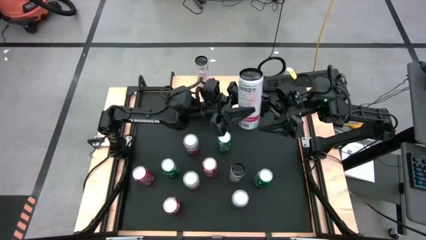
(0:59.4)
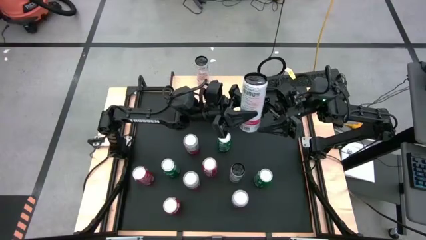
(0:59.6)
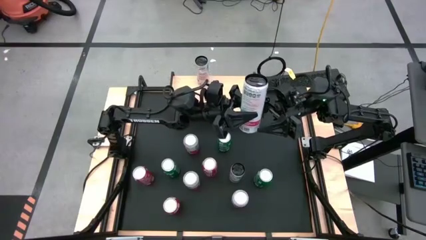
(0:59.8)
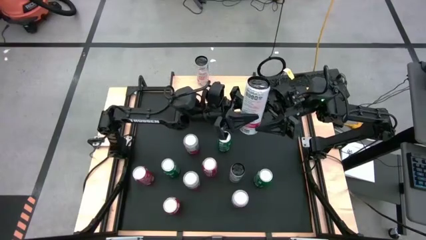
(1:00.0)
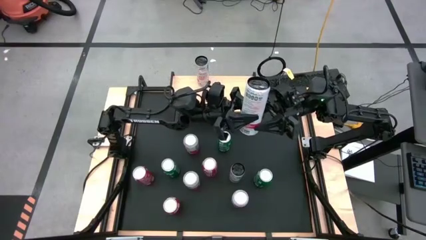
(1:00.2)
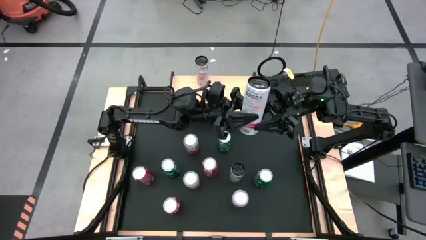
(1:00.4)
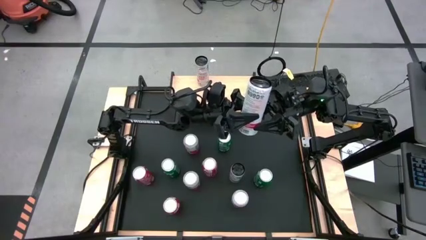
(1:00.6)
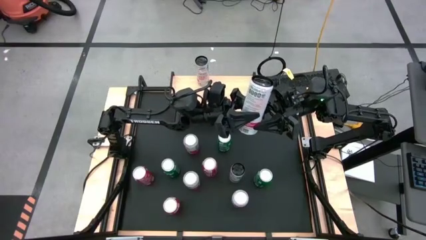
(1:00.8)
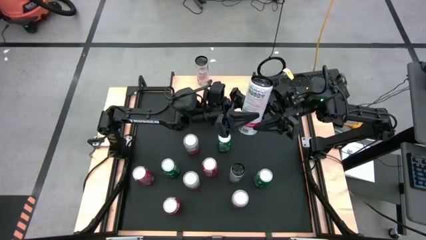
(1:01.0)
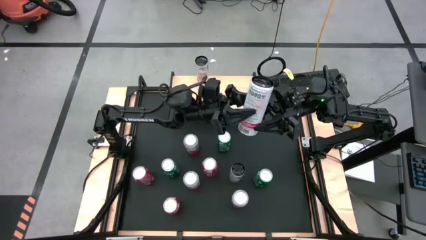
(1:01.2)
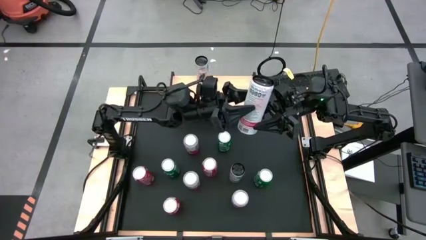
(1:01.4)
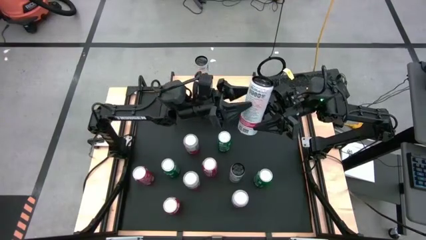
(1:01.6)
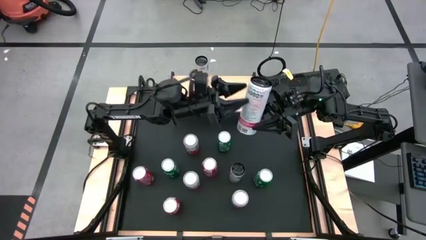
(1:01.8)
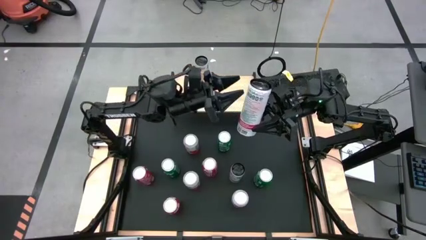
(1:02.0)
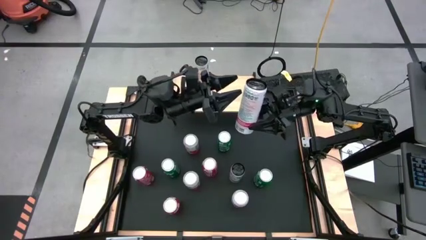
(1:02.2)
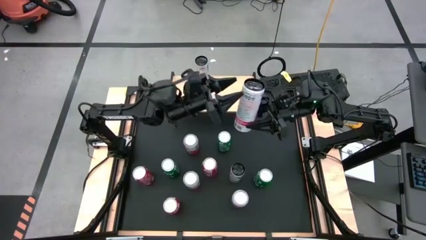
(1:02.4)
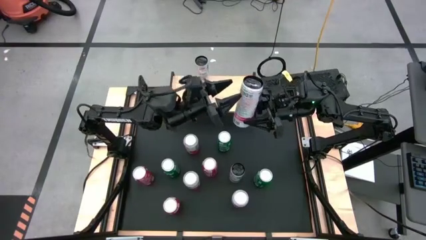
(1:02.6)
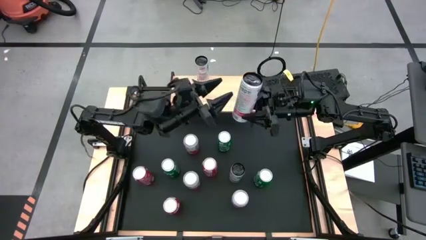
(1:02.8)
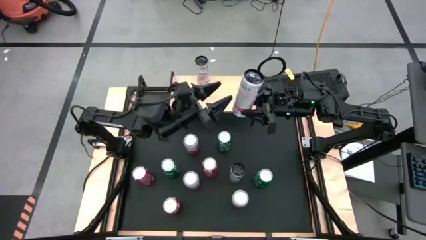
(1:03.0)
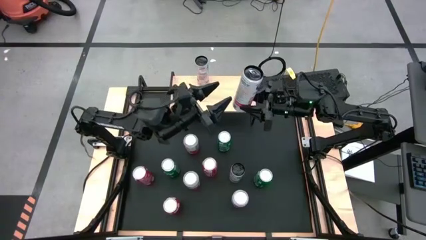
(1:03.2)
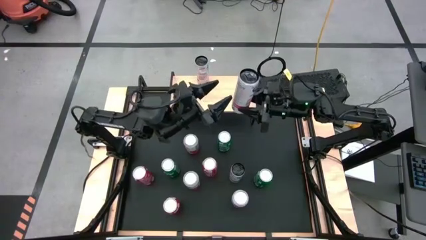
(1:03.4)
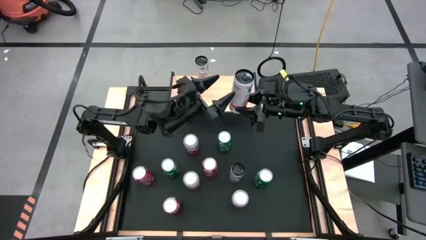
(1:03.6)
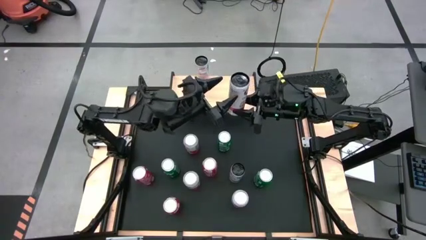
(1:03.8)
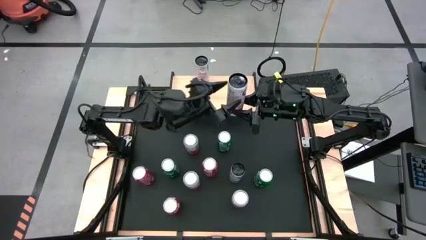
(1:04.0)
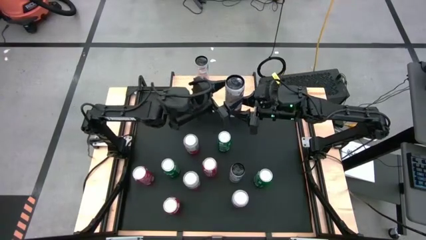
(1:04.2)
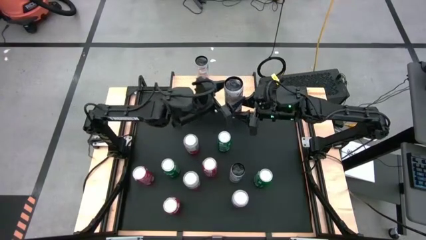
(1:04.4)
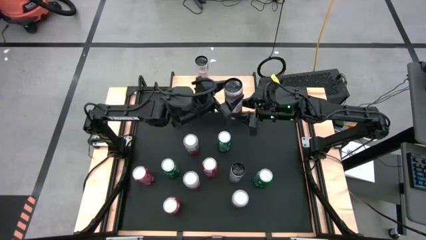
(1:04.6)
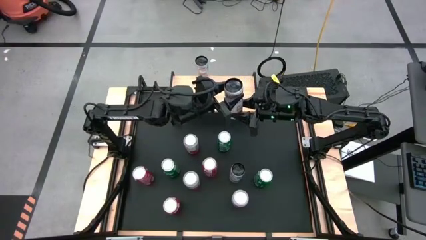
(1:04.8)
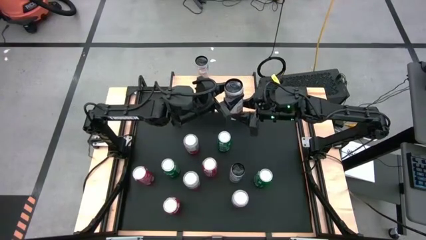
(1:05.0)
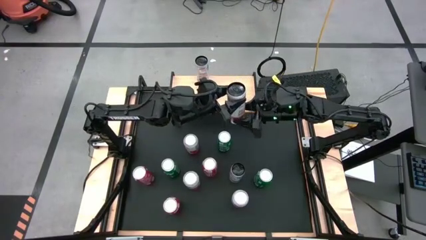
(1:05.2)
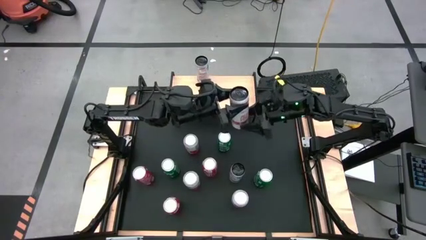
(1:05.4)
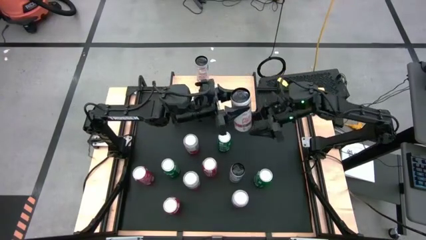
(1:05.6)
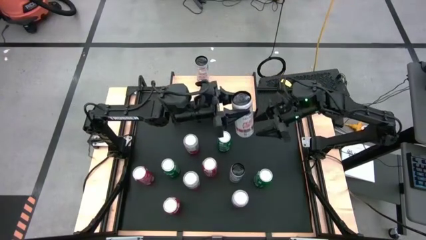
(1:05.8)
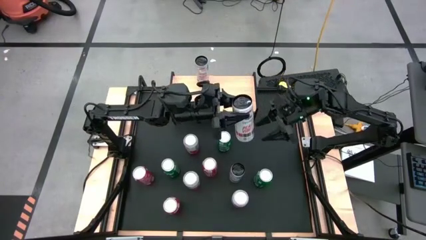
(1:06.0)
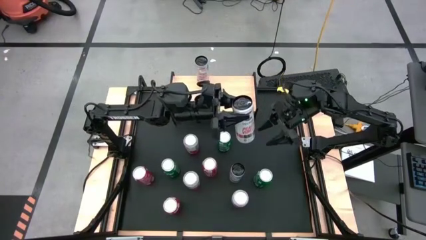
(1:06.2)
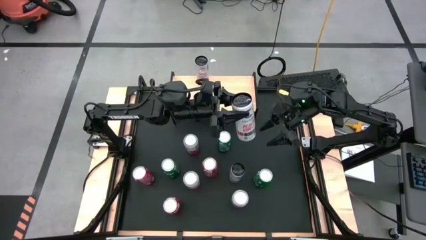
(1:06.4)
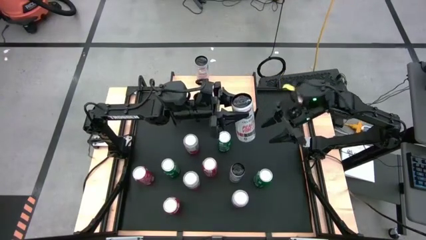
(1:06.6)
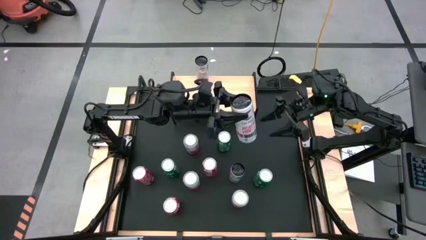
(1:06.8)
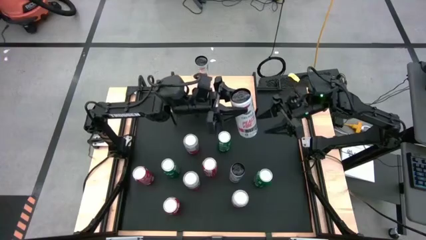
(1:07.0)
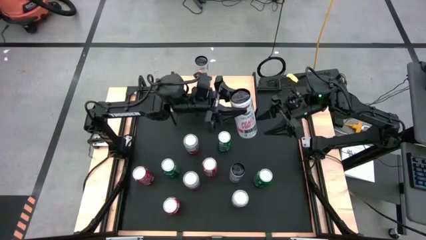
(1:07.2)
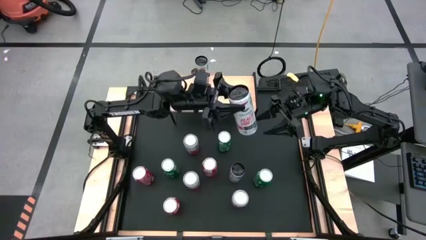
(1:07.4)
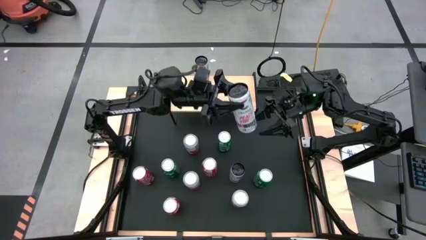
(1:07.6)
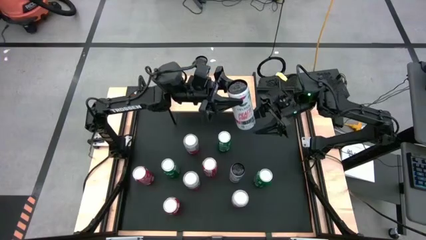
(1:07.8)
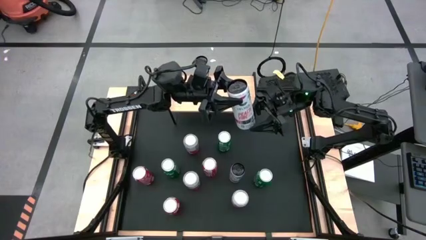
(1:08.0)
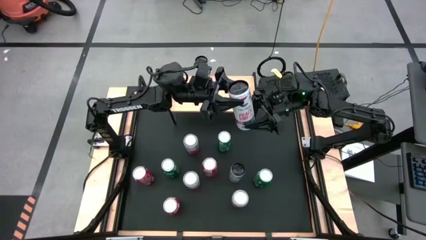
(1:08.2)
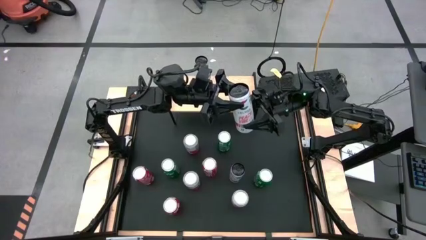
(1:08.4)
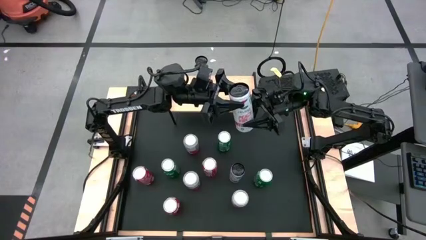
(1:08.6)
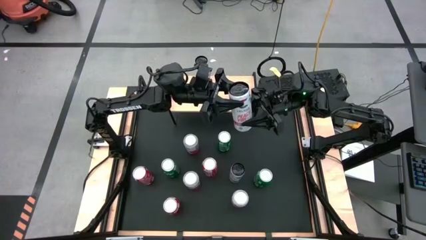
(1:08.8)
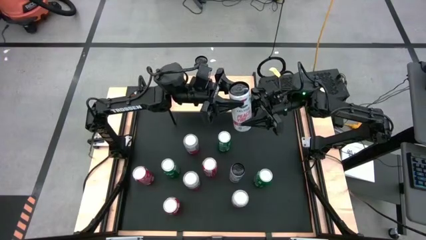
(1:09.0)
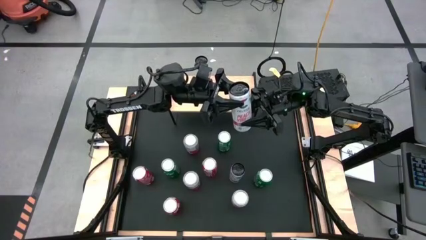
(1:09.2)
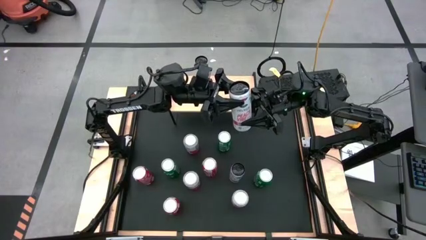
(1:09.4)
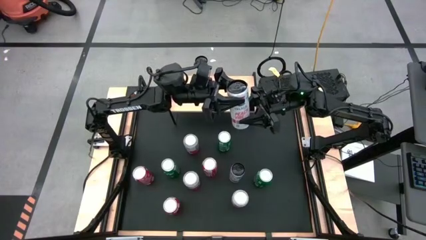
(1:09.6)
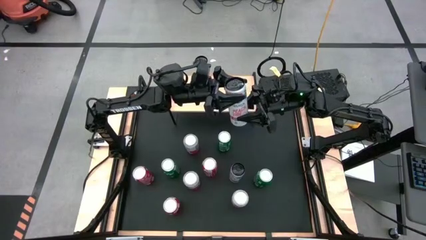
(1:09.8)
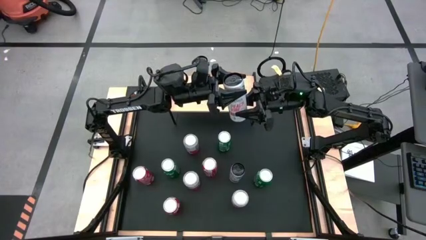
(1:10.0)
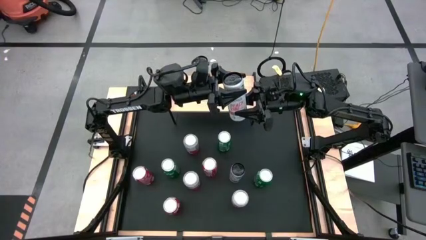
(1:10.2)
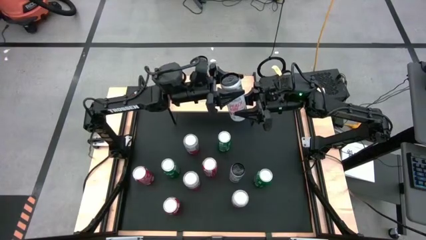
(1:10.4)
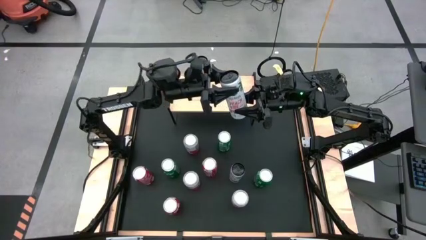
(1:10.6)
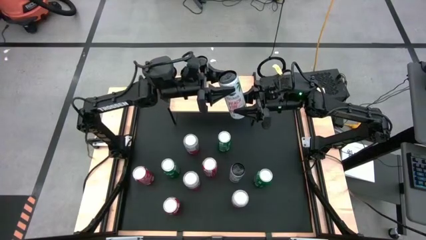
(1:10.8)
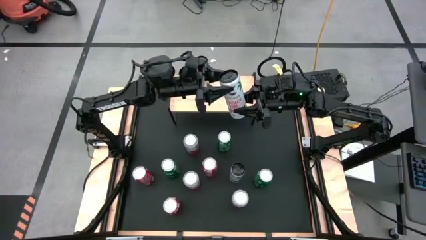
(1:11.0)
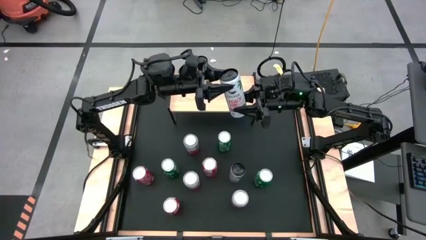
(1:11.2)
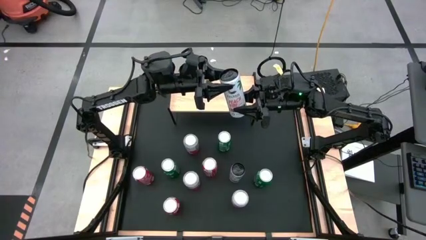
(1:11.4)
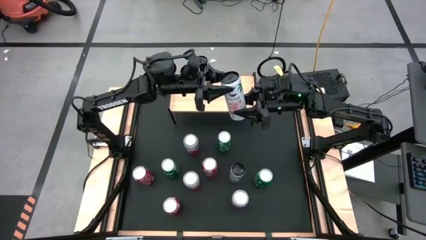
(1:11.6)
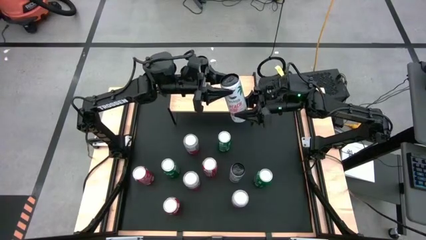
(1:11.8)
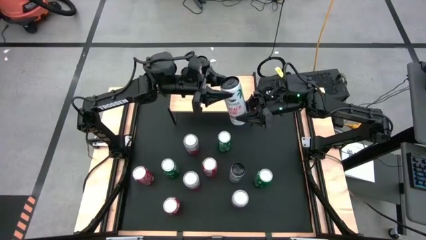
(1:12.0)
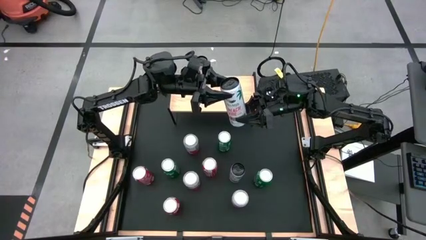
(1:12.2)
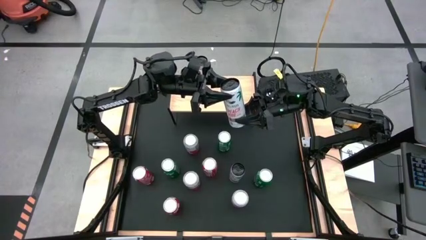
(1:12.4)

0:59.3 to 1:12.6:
Task: Place canned beverage on shelf
Put the top white pink soda can aligned with the other white pink soda can on the shelf
